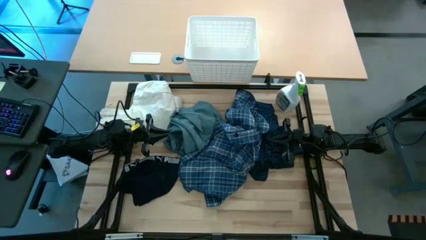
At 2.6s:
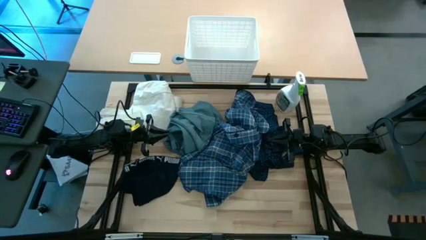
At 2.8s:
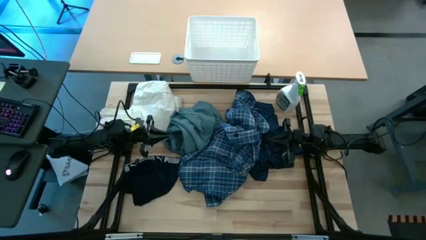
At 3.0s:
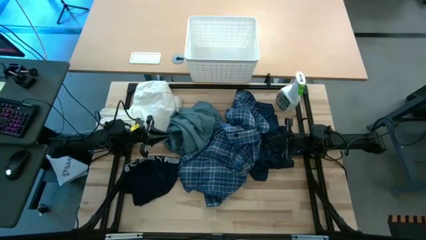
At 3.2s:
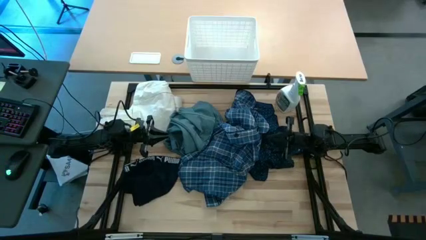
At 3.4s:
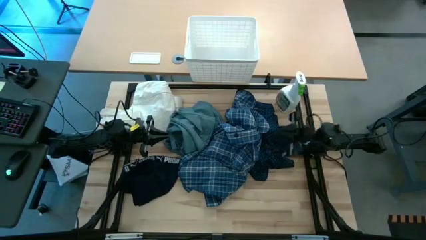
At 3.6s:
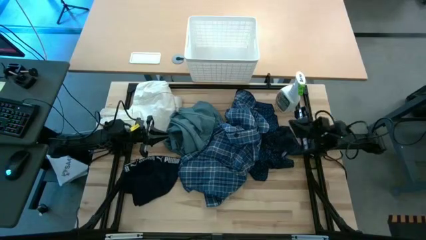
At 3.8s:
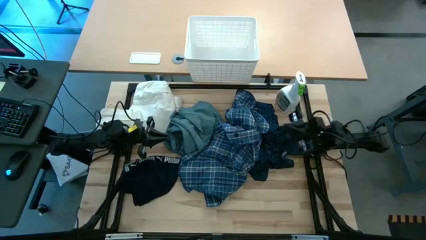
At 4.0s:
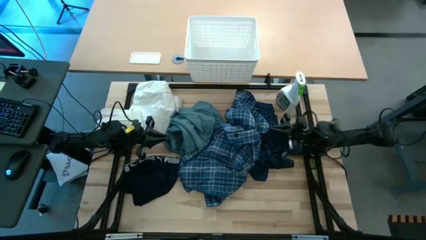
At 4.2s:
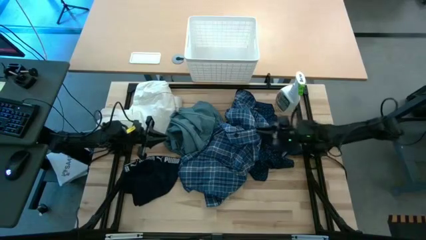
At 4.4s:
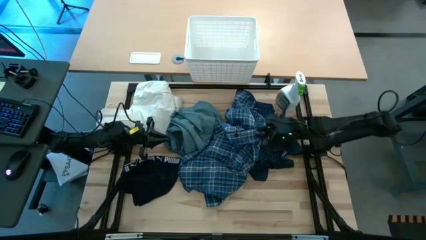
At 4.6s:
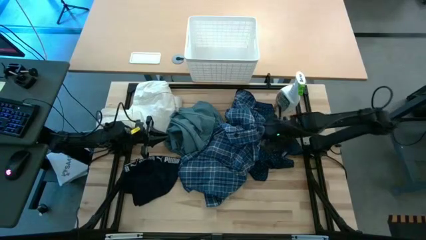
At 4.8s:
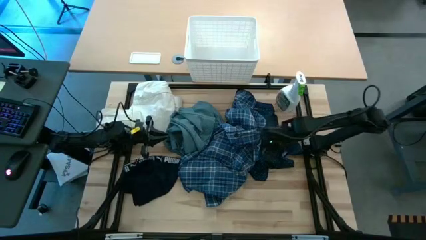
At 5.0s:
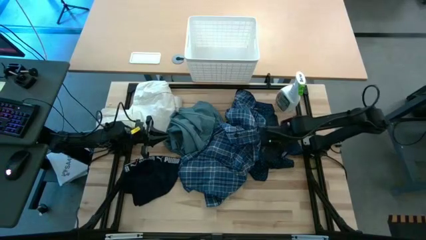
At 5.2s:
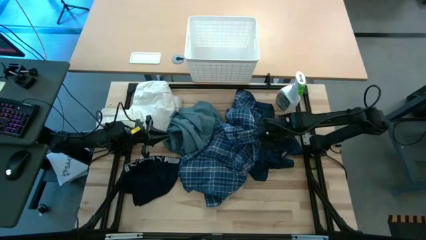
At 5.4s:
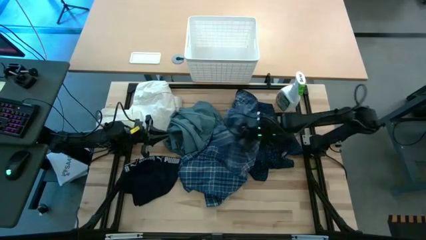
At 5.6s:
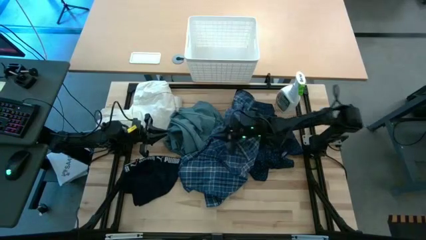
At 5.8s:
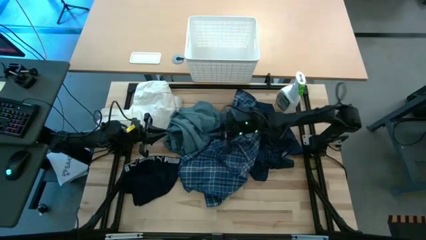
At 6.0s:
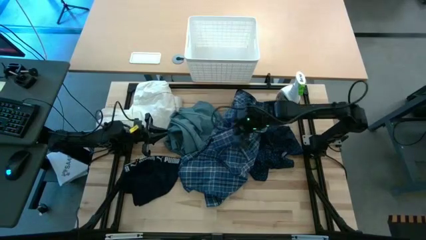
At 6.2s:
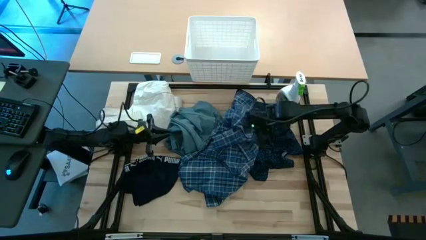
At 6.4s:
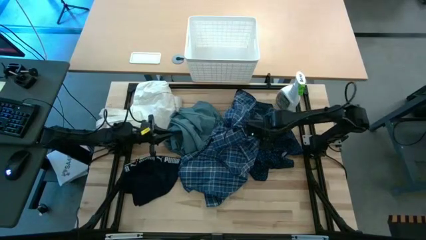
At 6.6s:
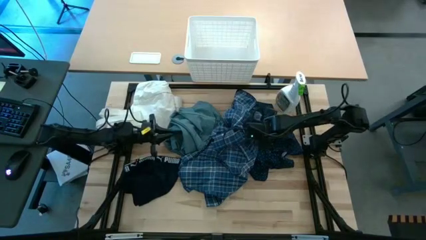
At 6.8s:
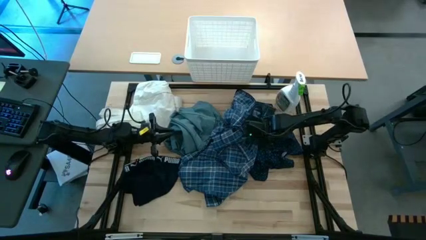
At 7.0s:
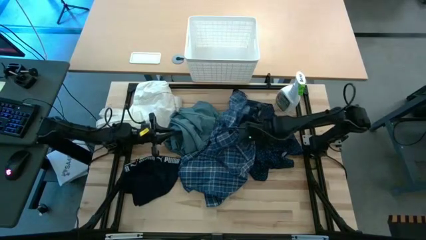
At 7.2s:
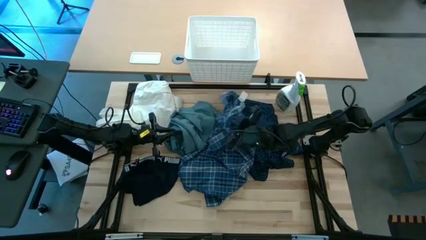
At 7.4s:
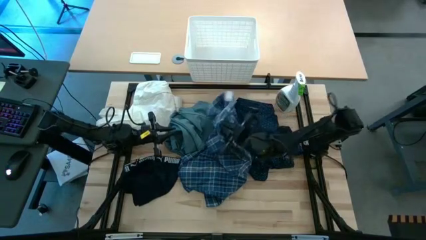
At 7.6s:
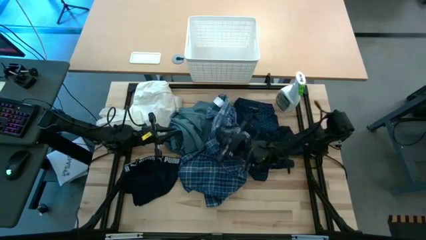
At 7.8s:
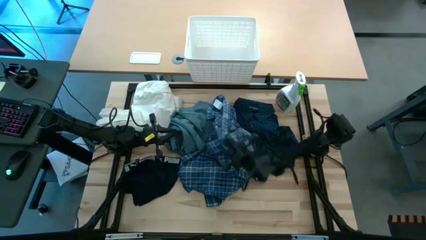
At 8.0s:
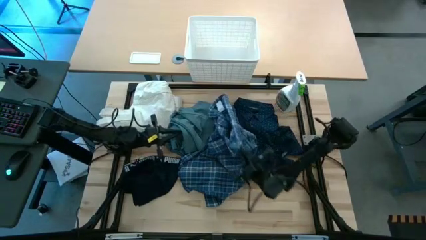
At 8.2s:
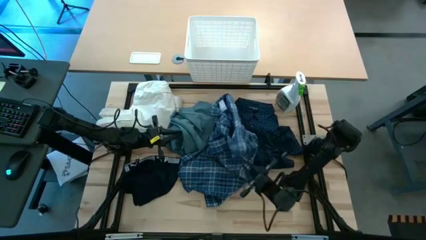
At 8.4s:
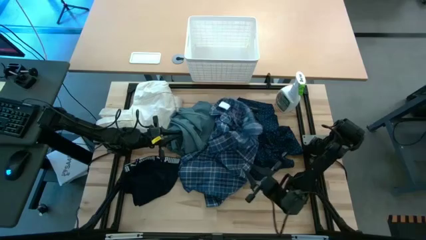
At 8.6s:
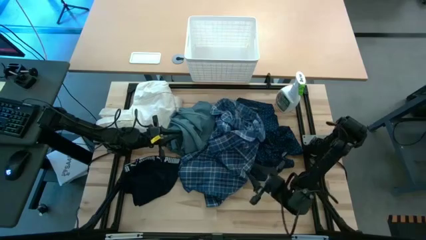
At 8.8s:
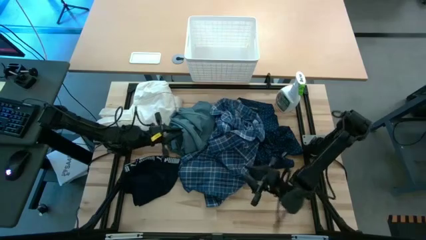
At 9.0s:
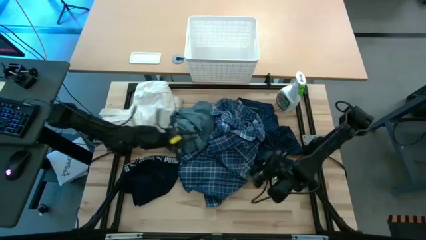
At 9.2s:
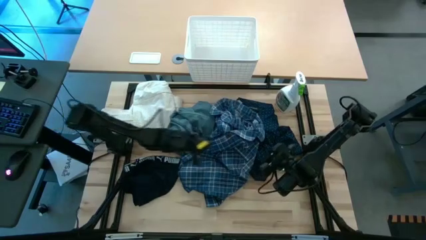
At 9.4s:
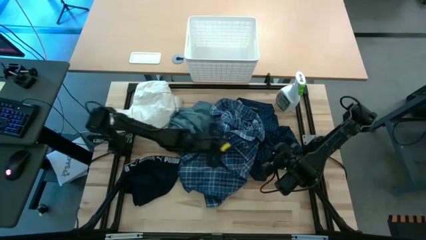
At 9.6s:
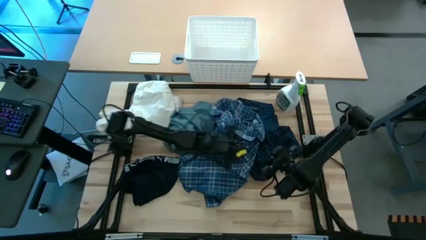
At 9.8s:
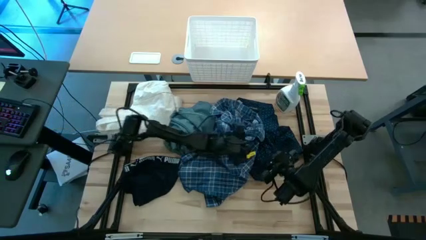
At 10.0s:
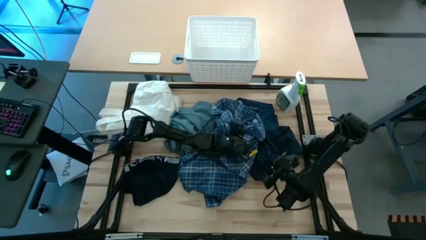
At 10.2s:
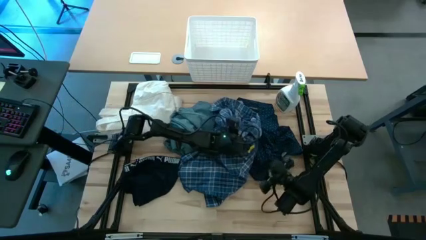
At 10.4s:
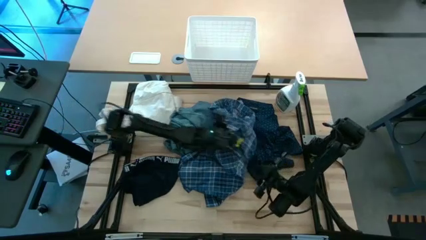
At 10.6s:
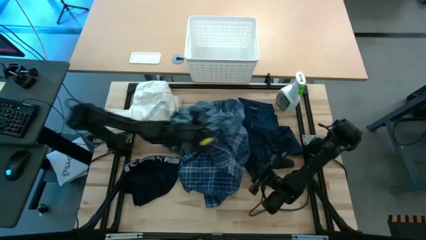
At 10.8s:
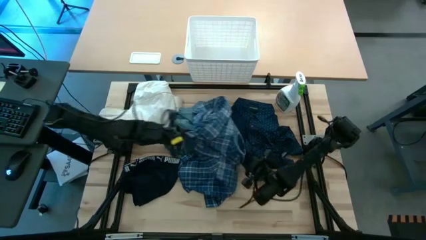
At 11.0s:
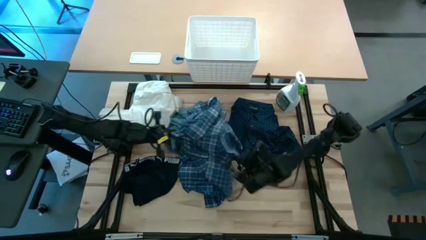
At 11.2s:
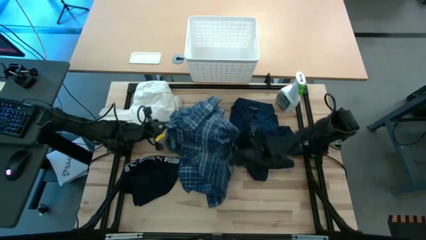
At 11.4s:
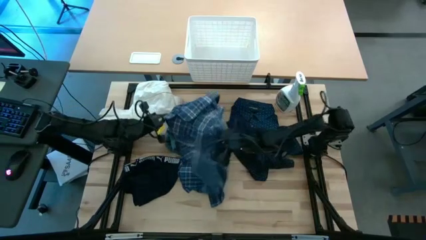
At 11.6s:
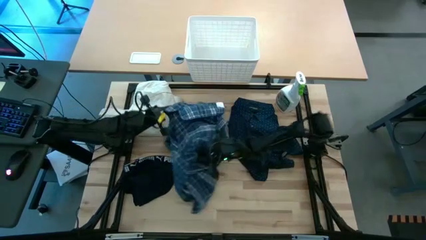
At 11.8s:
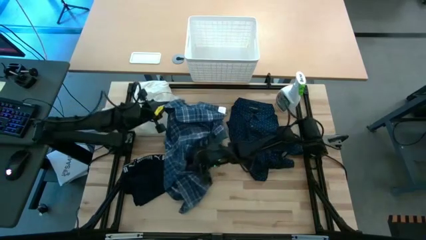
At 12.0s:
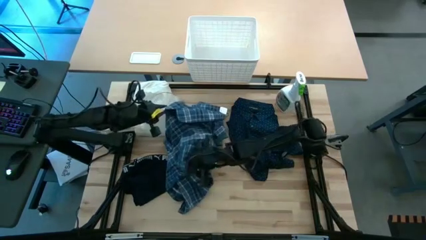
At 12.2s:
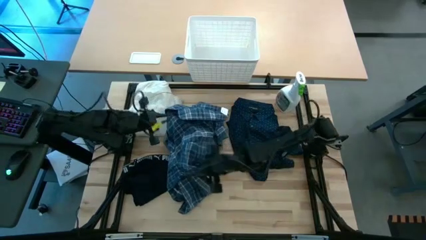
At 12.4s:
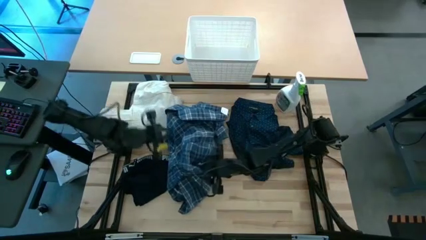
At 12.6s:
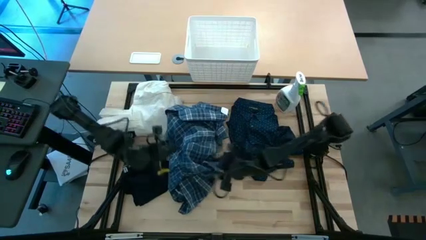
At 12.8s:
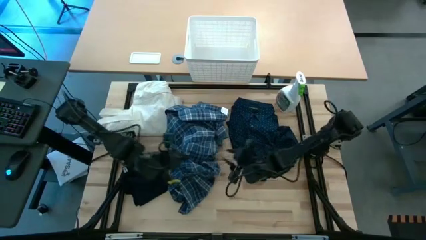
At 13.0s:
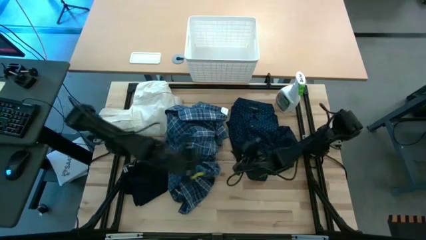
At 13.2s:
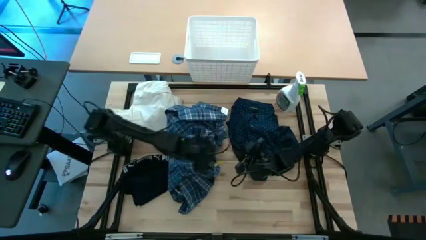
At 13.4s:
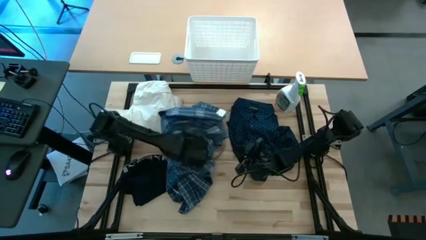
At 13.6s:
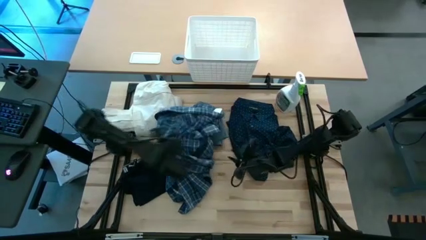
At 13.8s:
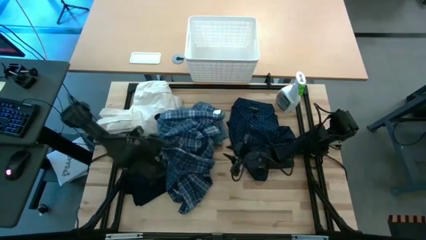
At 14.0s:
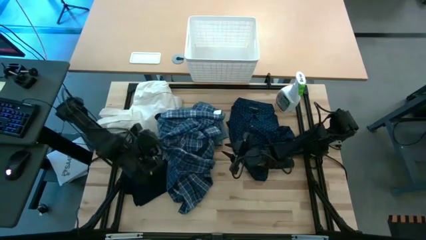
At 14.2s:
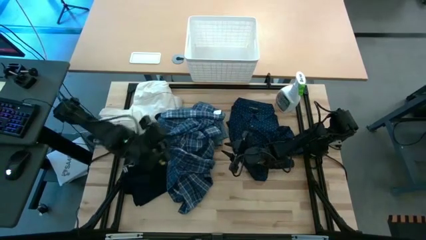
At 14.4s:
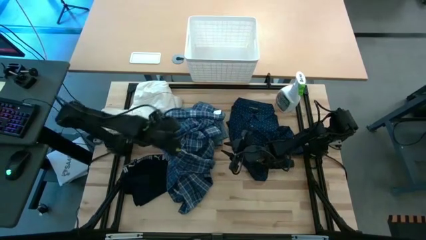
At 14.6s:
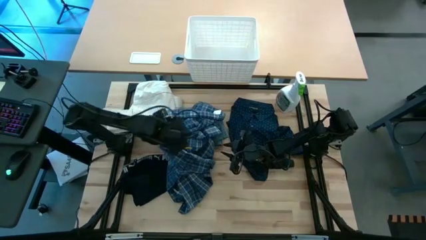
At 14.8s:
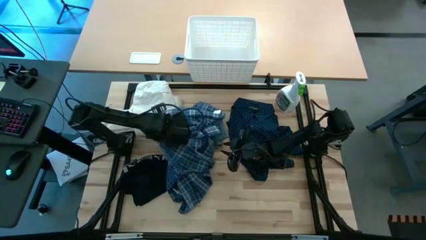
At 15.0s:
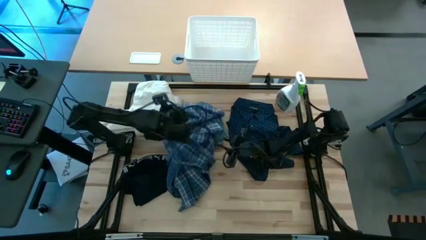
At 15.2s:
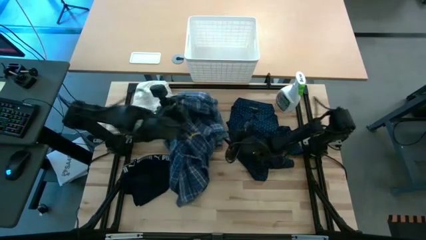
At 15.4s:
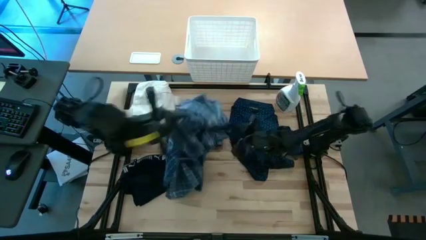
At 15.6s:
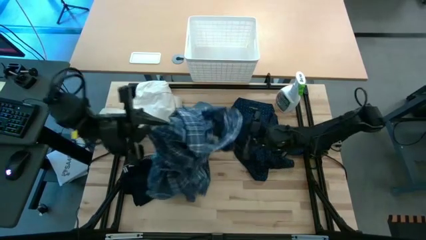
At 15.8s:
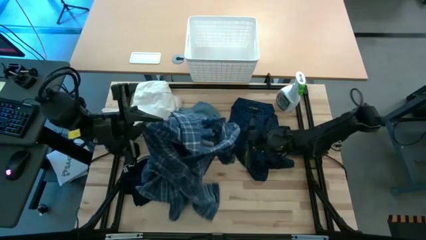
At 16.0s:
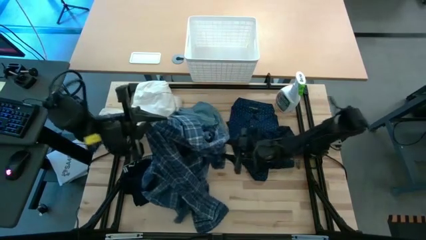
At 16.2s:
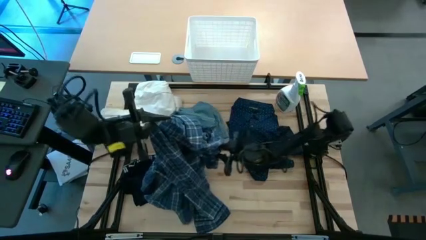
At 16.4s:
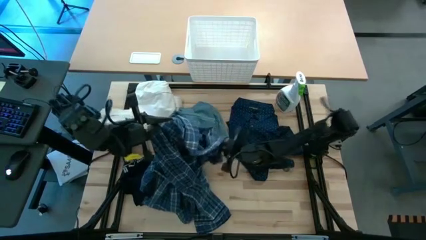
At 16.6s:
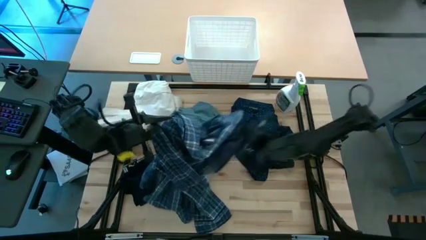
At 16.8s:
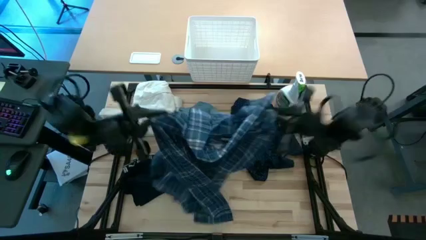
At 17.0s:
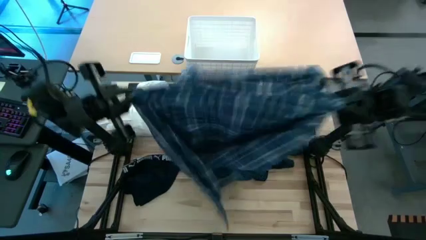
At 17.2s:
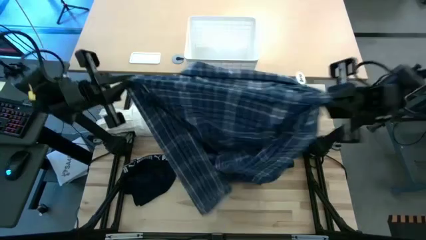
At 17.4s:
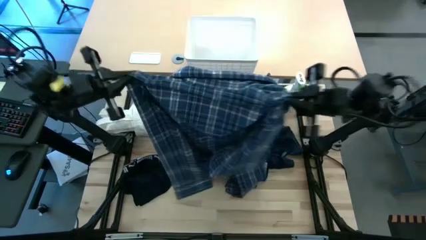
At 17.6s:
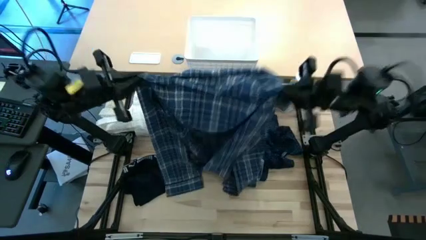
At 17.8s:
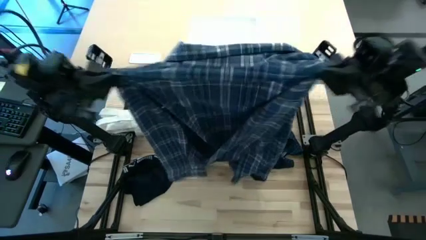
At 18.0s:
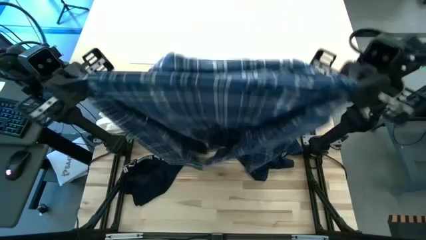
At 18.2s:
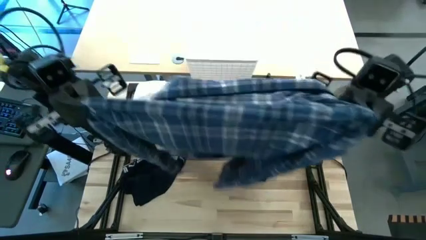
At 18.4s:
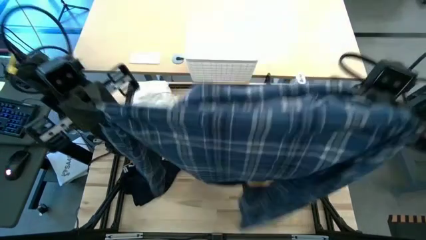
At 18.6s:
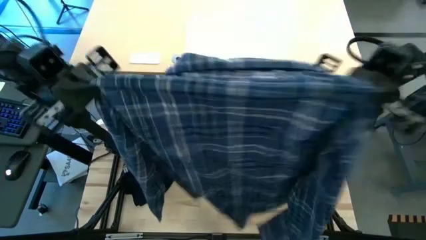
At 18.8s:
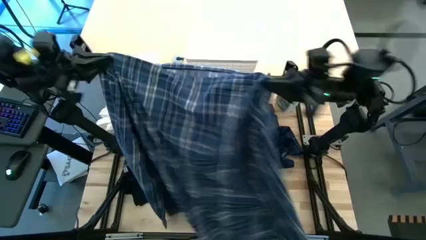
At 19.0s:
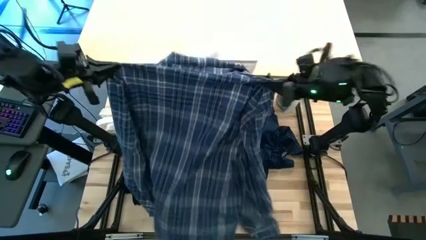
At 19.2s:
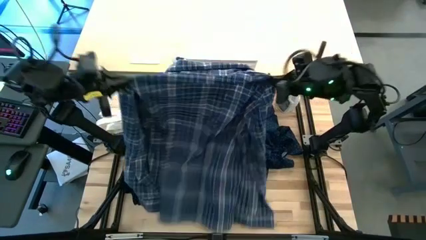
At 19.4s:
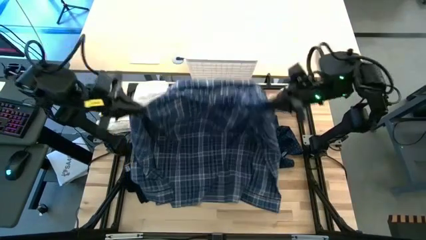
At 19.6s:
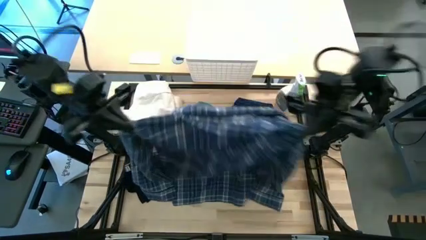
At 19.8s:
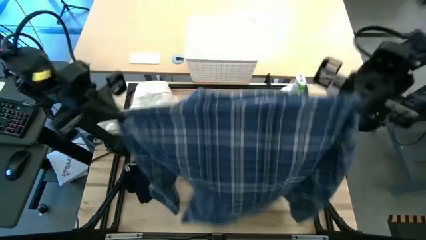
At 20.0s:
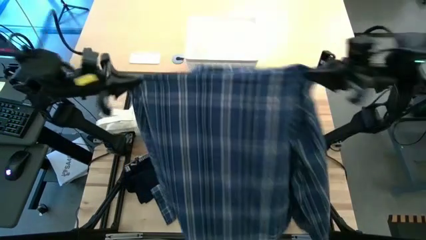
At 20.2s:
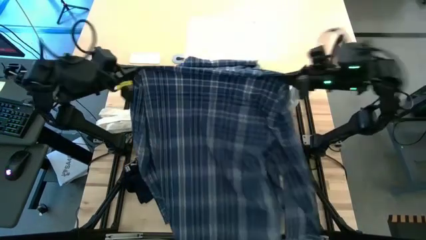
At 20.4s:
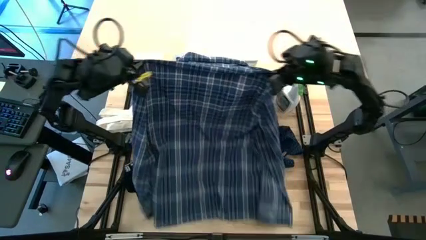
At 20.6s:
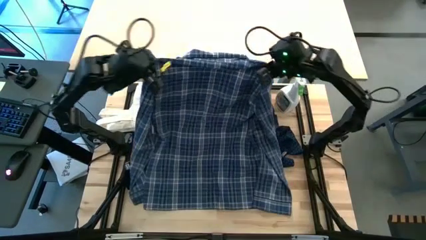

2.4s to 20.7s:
Fold the checkered blue polo
